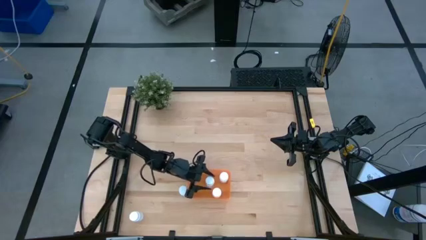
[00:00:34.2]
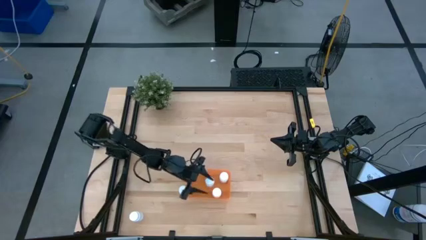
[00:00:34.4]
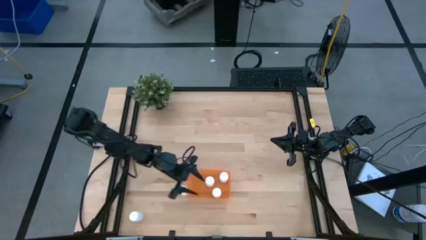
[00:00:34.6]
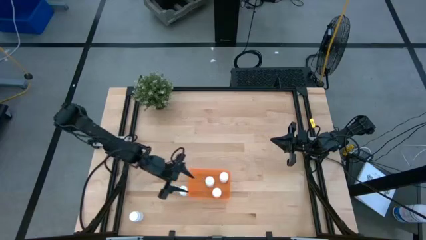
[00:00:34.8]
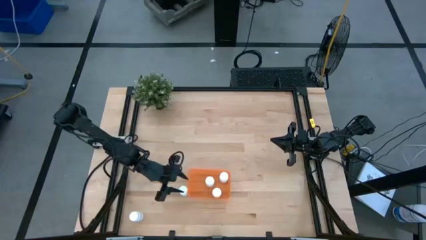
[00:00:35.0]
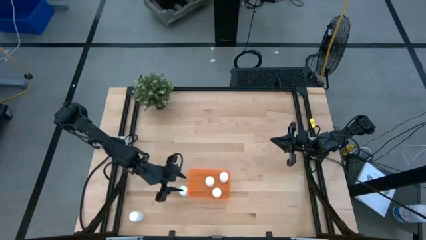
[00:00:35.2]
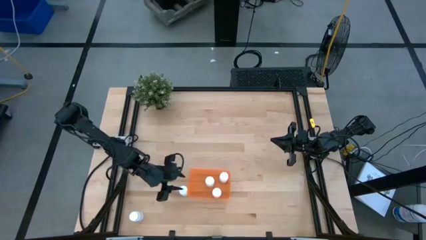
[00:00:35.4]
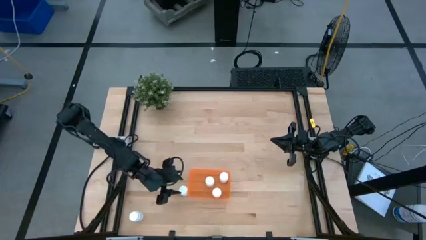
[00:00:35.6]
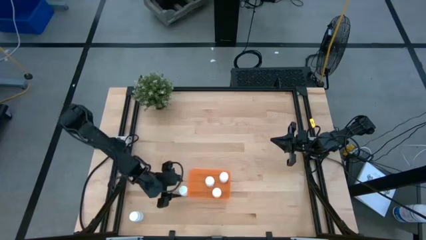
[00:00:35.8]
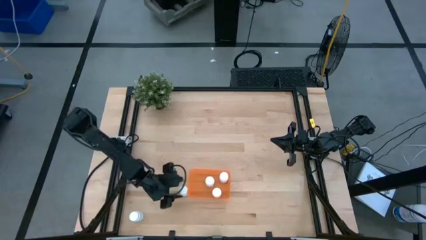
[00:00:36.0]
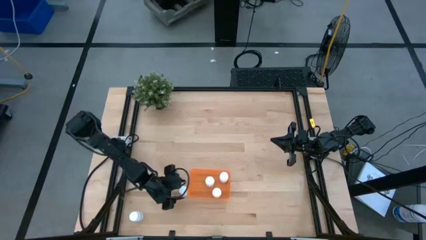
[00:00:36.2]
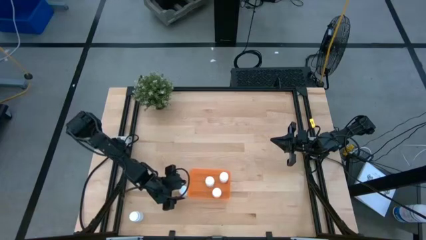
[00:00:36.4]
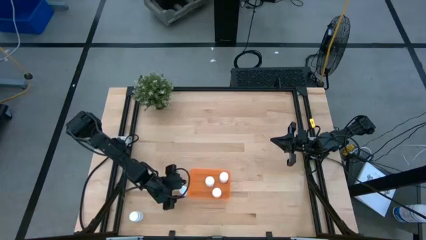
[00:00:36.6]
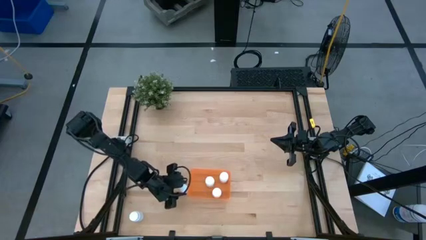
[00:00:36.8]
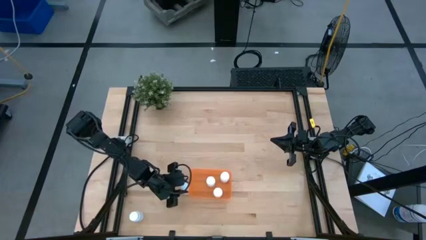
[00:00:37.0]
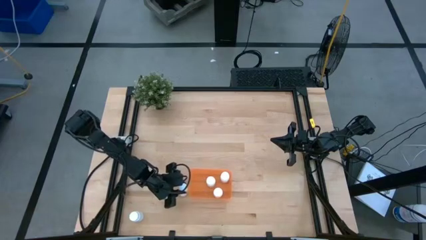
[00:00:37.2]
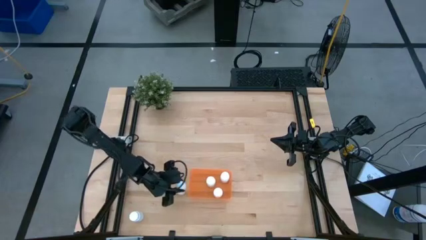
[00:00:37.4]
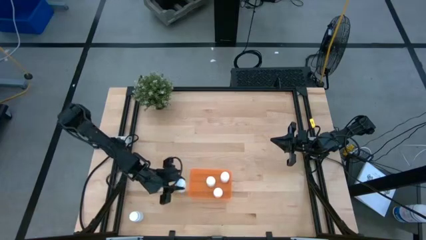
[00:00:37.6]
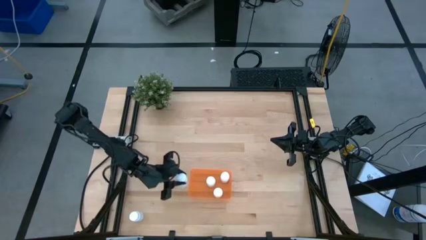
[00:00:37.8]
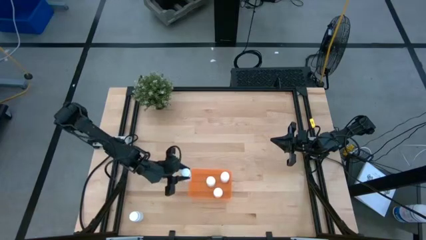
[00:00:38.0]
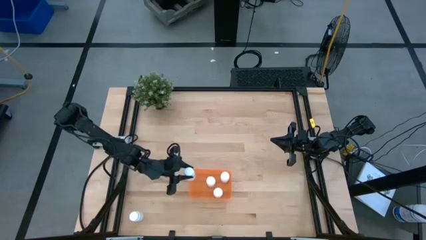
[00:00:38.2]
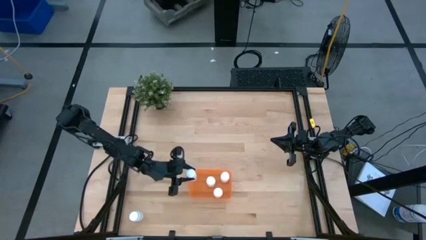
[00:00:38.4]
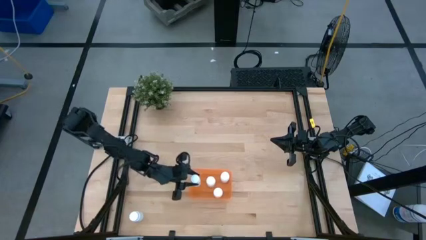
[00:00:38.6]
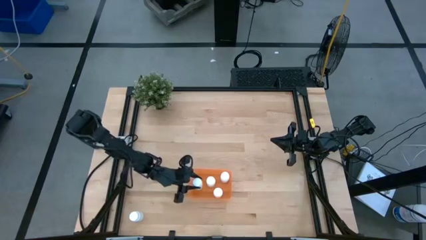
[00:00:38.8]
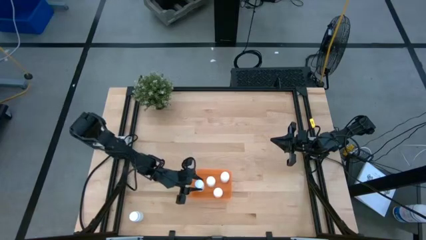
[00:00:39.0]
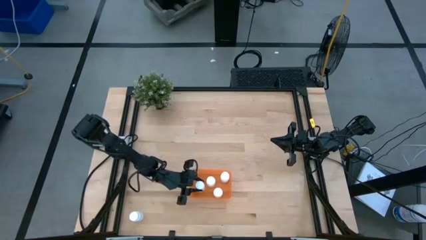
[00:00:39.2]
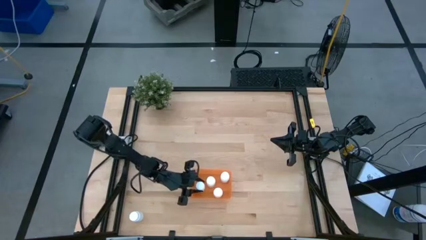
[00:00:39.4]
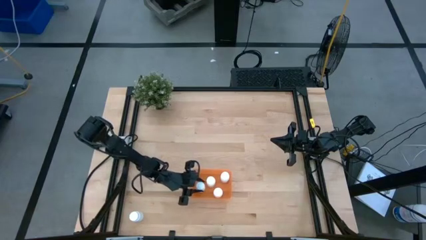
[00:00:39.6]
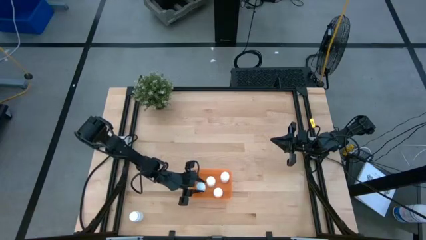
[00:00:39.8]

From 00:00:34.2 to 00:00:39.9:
Task: Pick and place pill bottles into a basket
Put the white medicine bottle into the orange bin

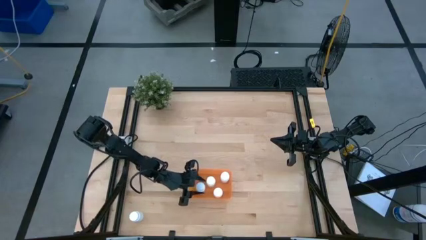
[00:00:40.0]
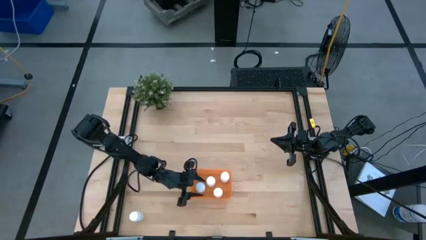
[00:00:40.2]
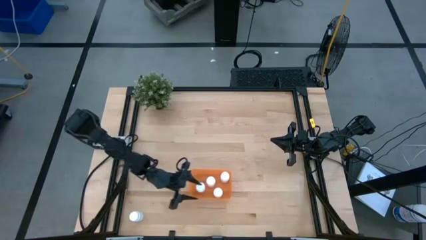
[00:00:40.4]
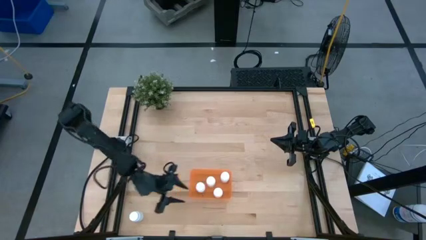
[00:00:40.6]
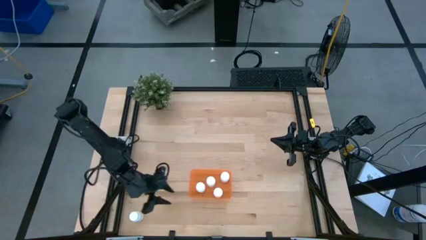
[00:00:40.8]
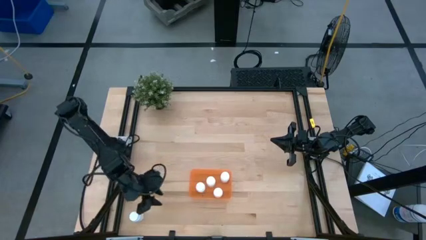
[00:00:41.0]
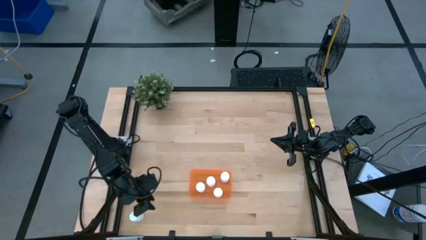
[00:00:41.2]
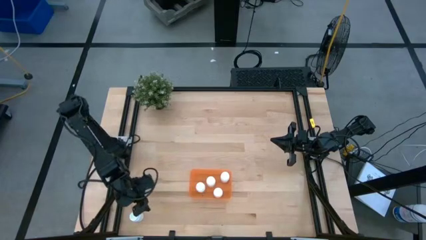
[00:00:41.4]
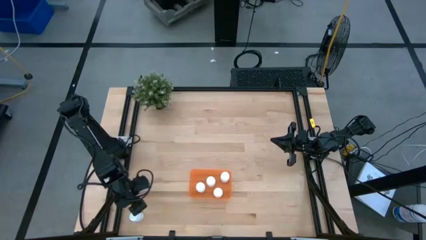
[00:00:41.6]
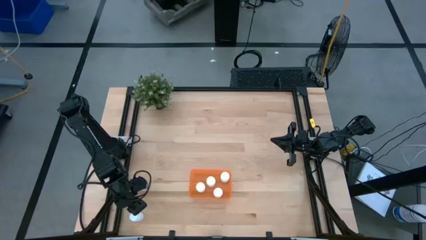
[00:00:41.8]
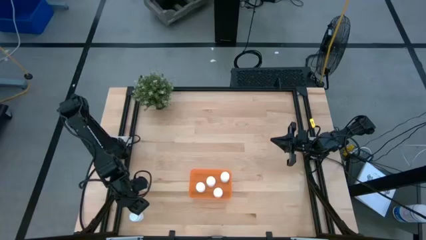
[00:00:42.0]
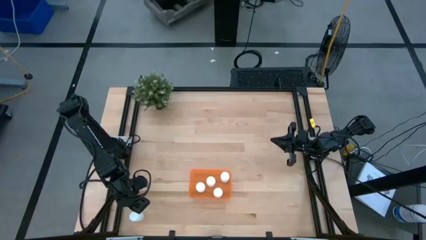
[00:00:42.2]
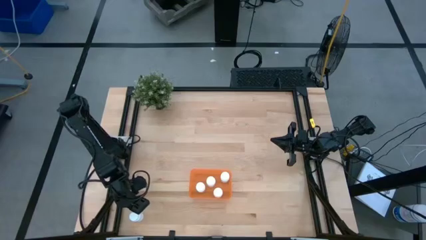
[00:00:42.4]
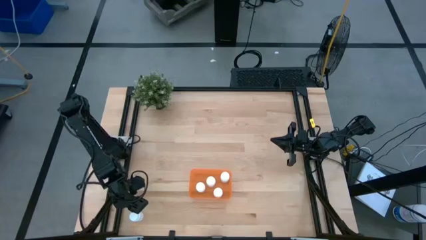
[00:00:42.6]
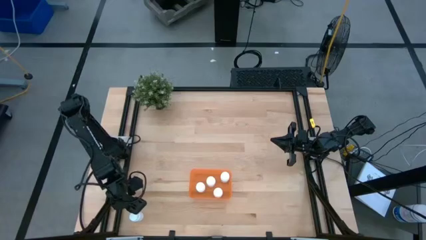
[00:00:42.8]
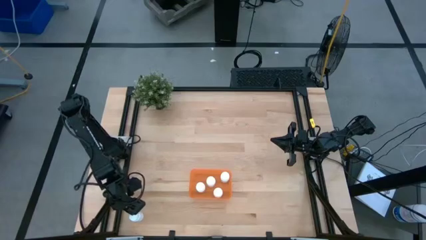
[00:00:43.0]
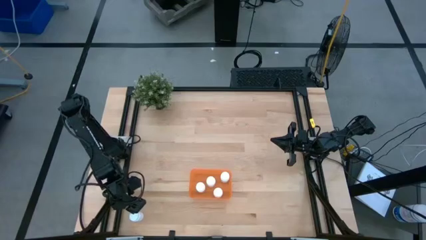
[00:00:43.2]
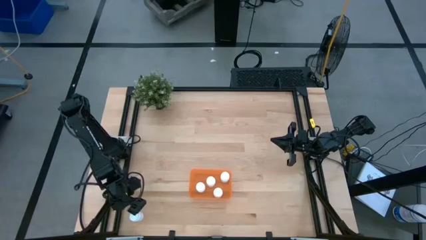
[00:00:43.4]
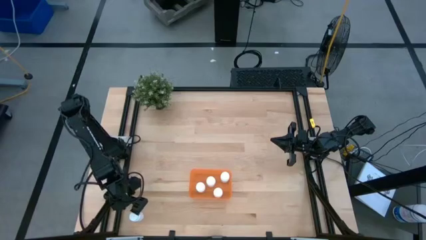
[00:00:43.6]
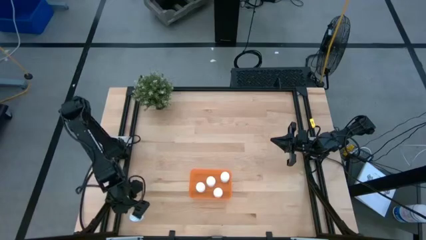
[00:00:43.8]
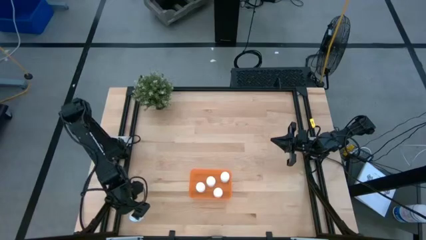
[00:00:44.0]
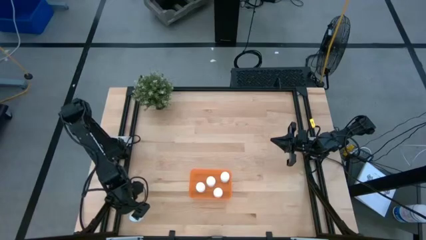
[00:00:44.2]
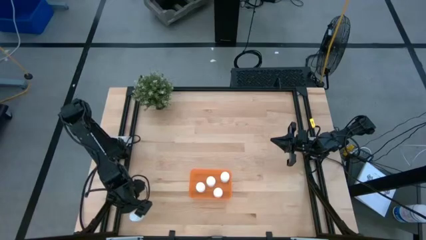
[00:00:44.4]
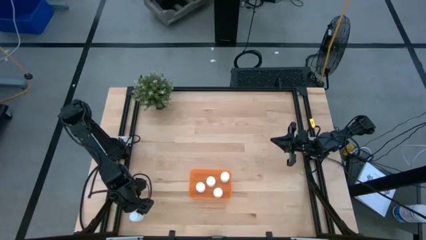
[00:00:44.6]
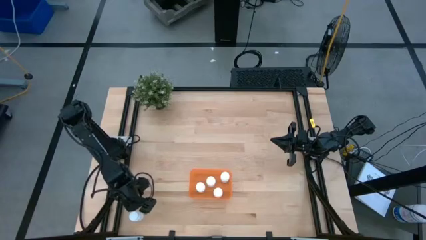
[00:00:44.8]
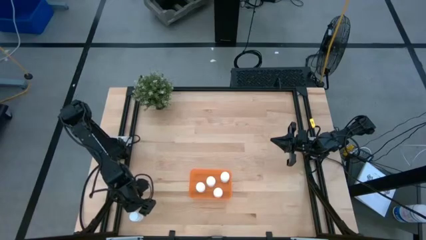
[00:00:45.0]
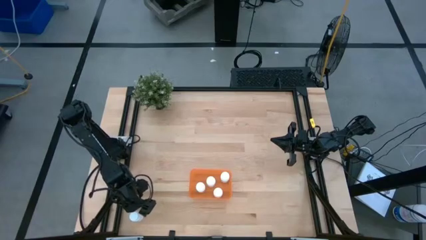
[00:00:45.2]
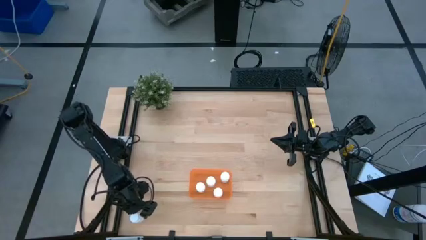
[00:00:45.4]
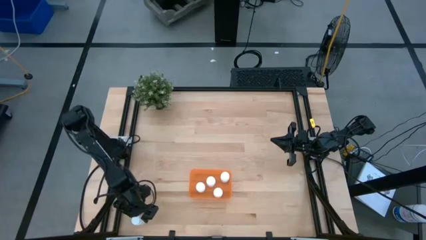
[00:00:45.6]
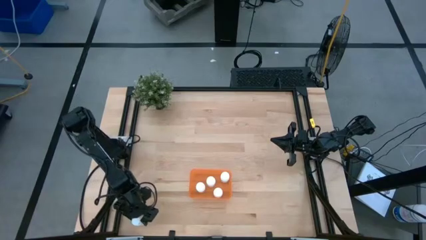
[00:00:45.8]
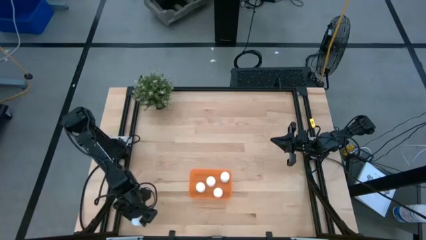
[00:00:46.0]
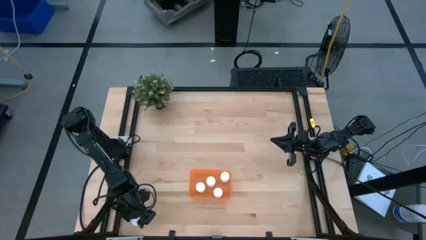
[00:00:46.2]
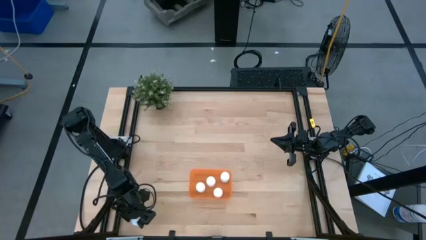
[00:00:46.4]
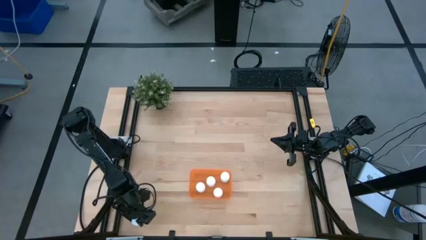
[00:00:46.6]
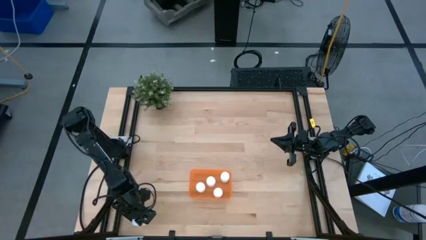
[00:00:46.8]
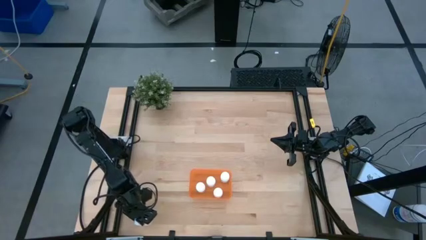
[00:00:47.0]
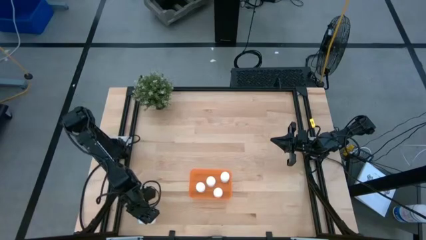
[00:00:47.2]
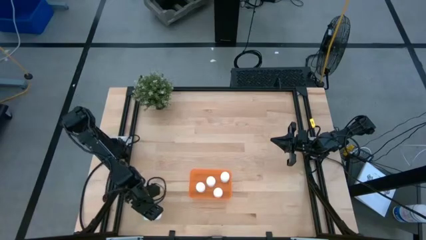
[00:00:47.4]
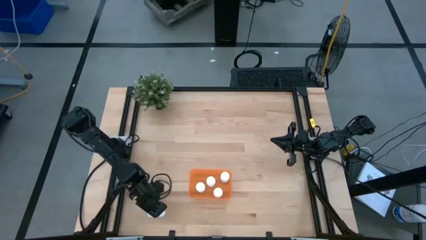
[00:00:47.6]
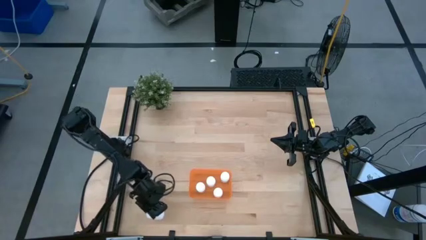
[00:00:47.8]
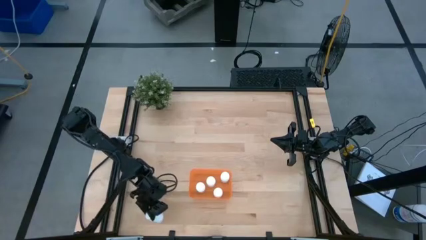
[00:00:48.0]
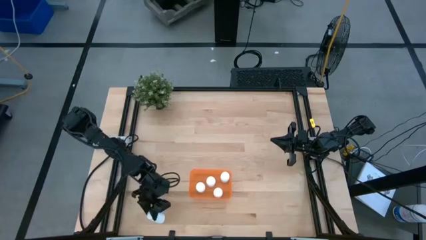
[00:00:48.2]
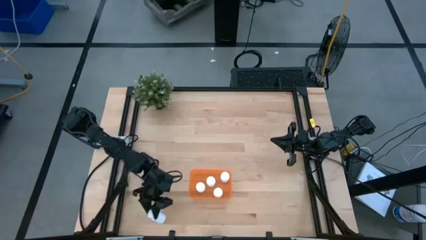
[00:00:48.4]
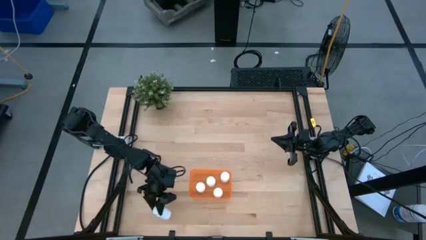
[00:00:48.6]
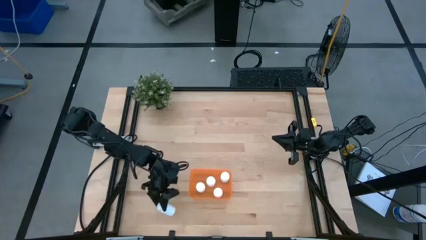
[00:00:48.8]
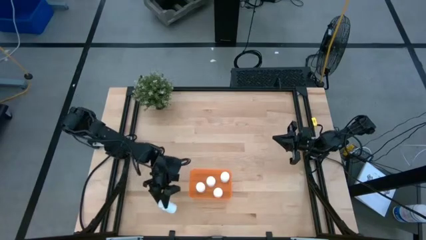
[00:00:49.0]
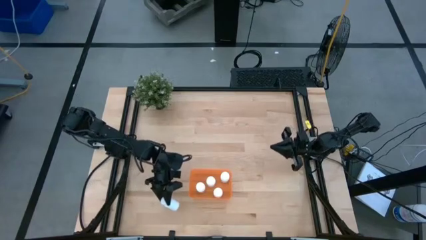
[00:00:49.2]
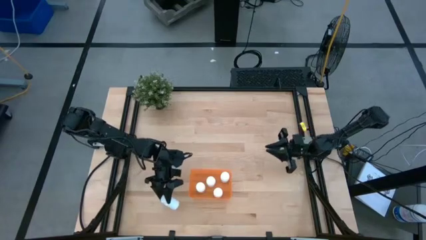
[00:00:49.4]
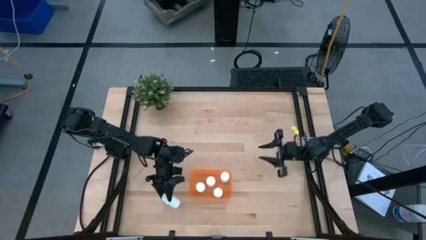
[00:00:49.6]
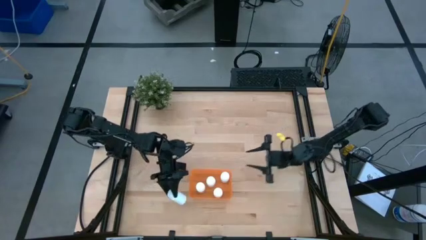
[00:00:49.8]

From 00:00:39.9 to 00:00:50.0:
Put the white medicine bottle into the orange bin
